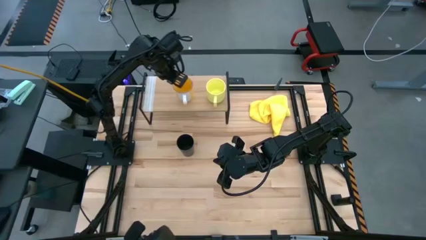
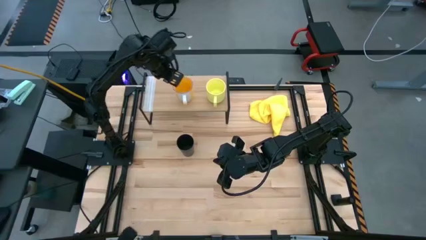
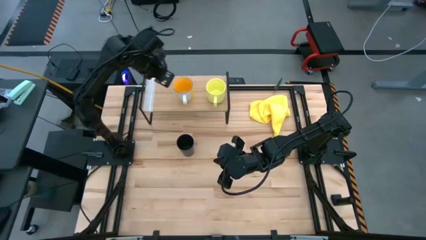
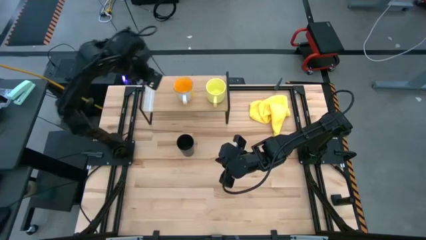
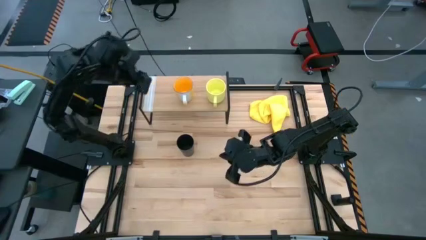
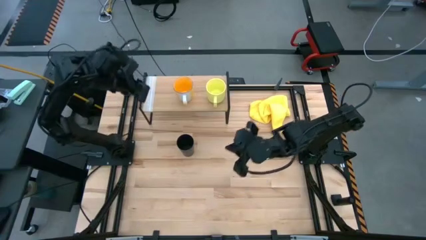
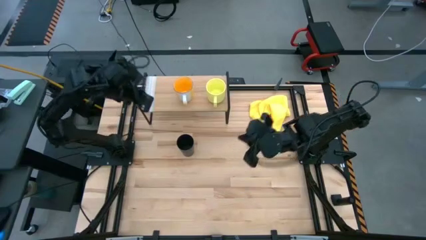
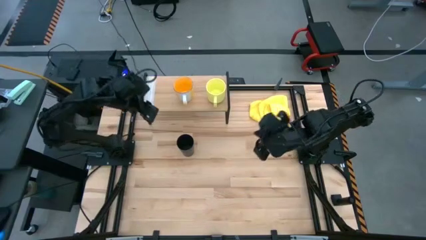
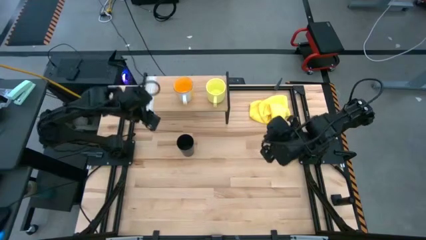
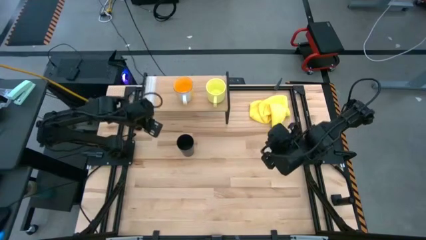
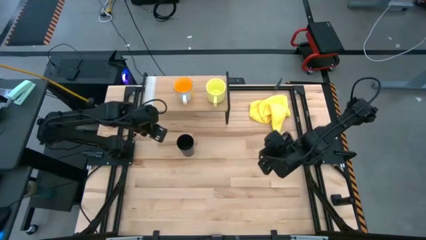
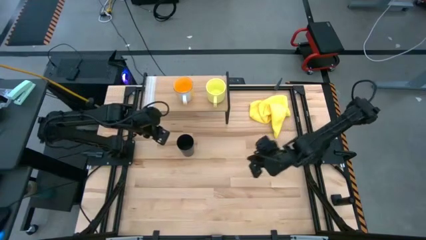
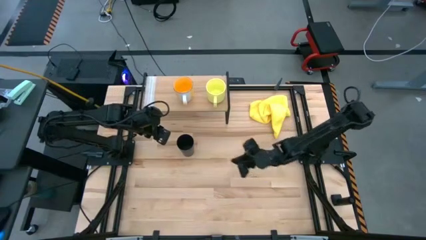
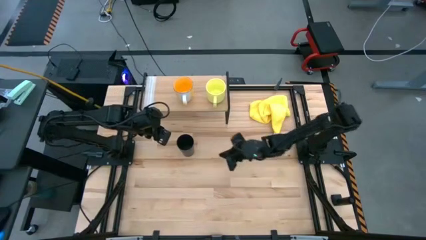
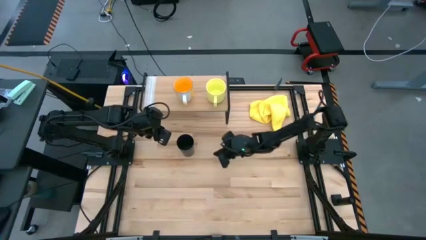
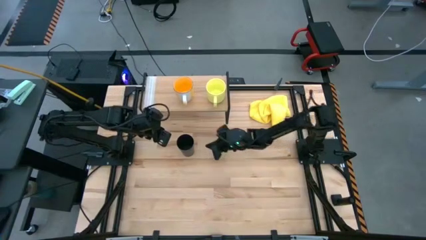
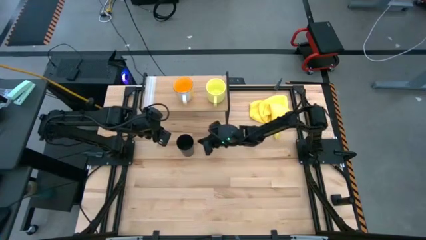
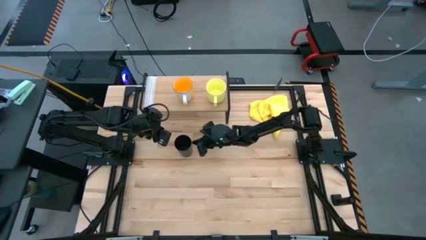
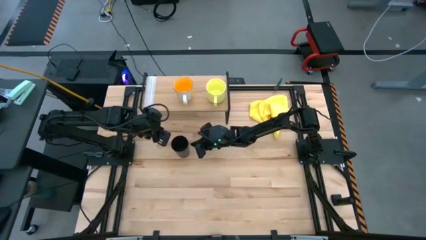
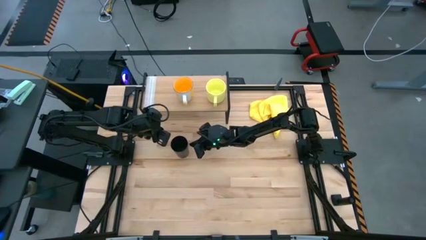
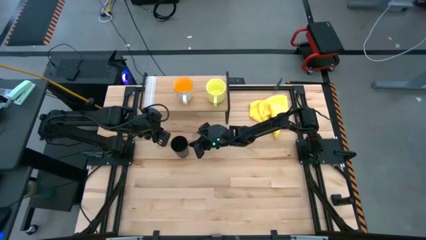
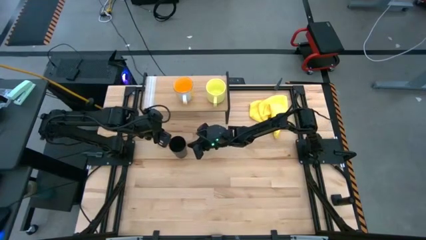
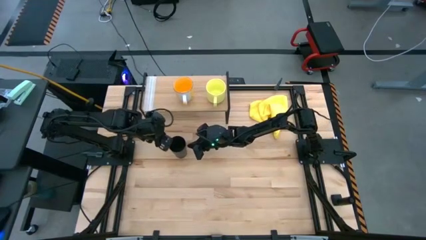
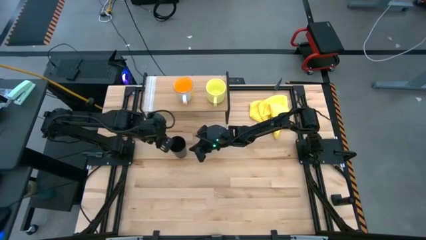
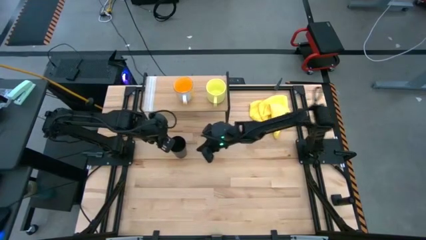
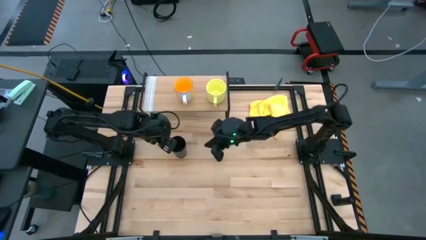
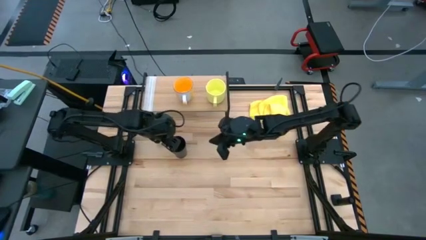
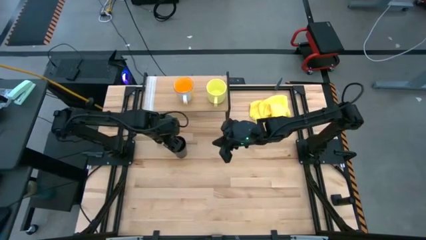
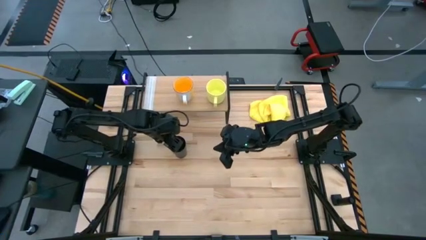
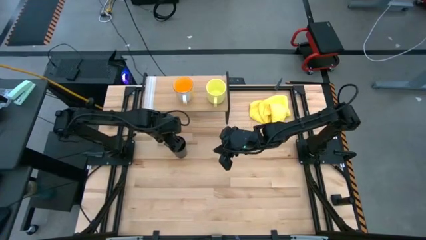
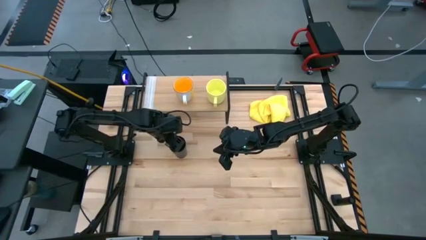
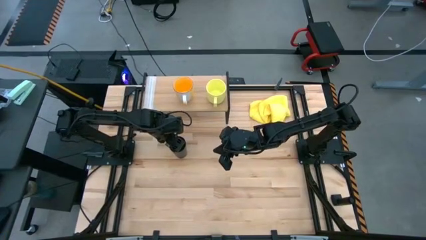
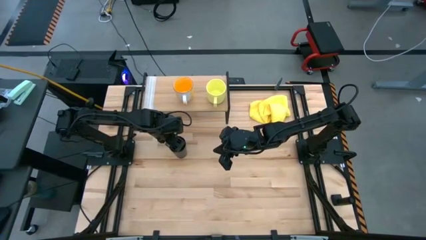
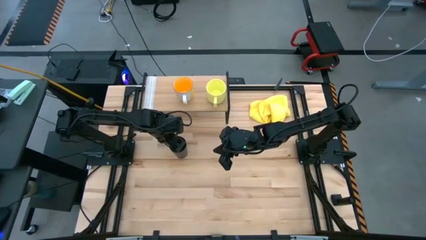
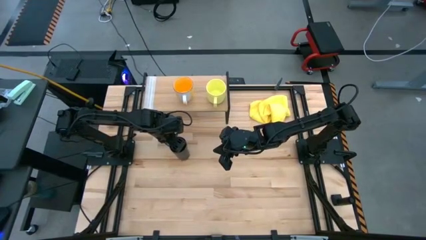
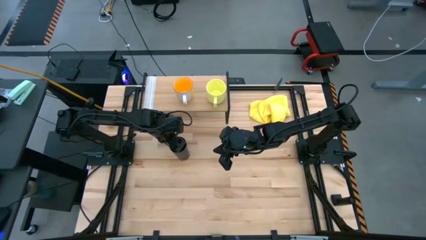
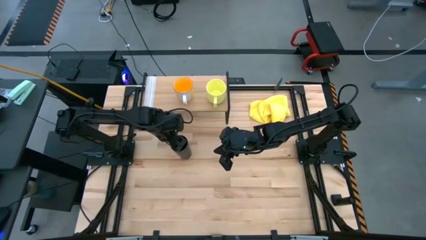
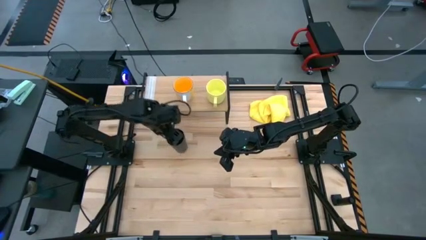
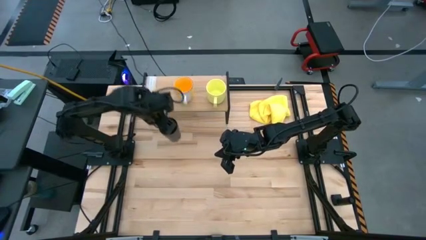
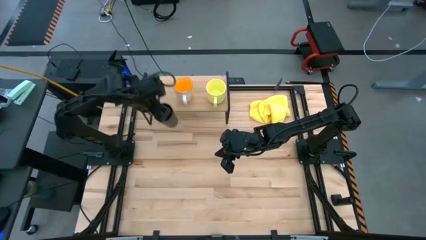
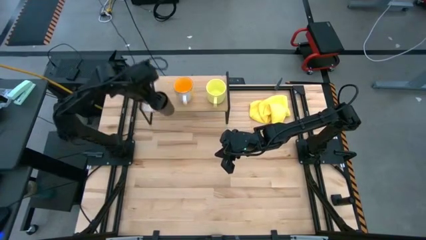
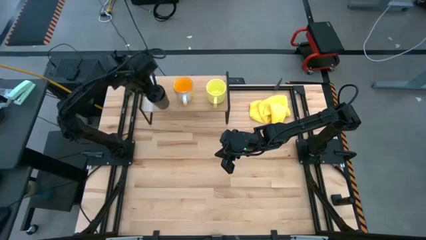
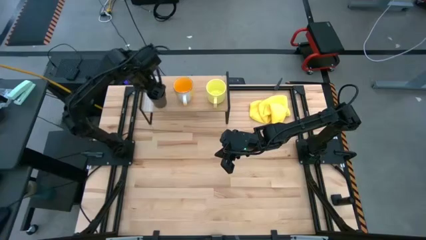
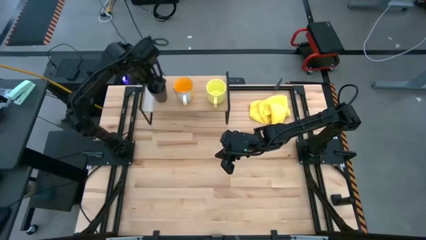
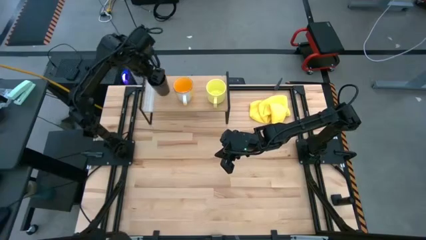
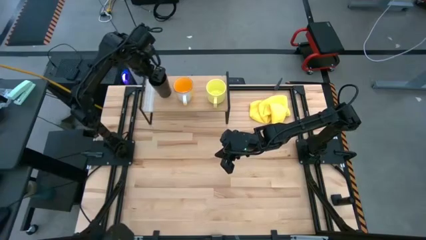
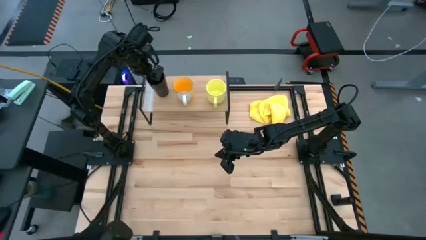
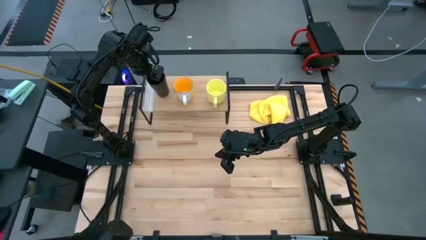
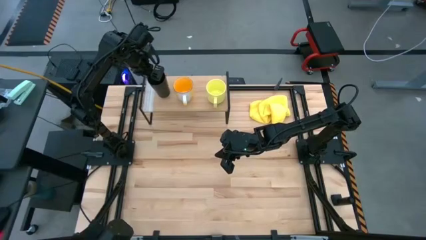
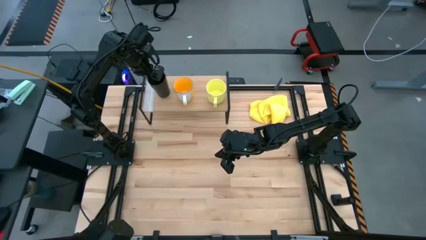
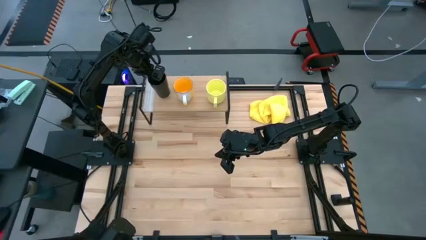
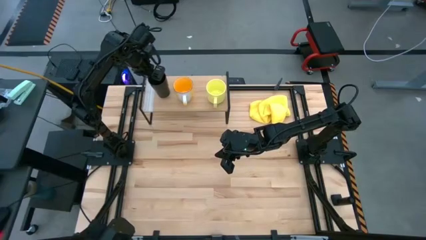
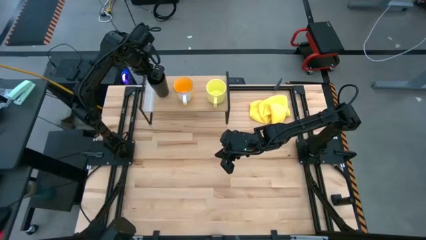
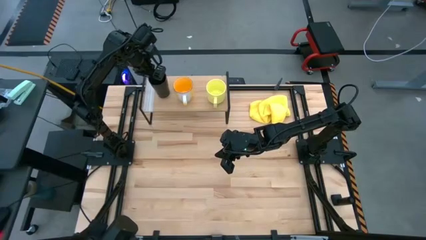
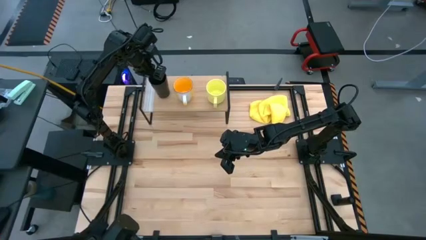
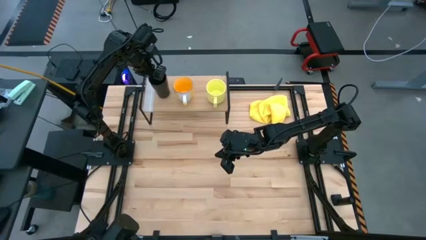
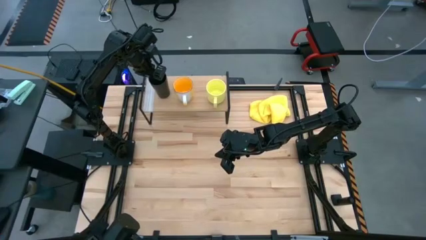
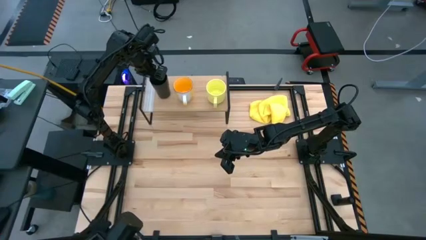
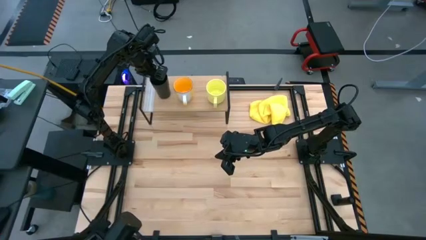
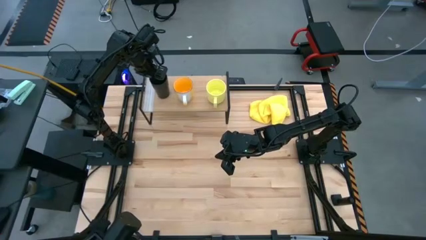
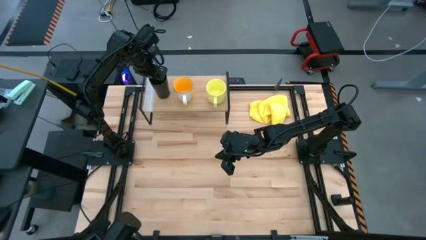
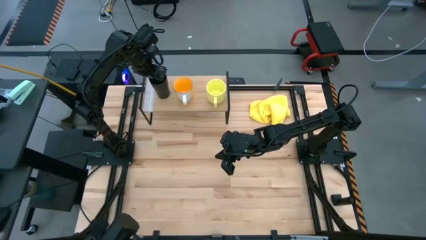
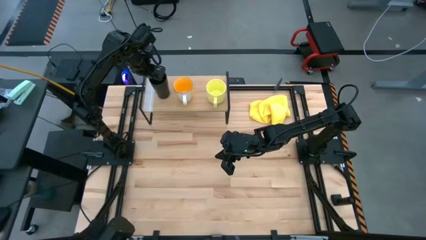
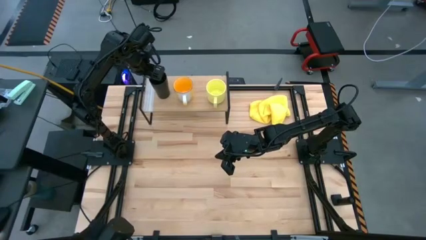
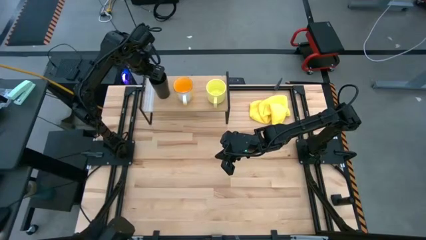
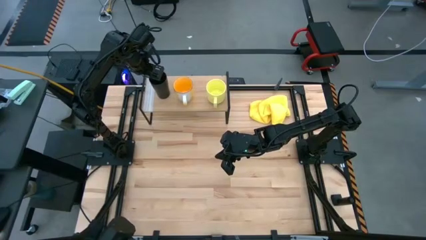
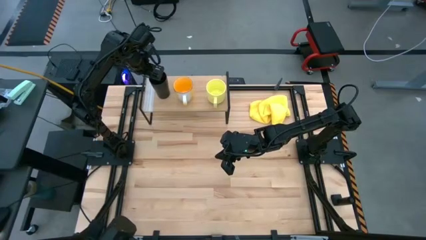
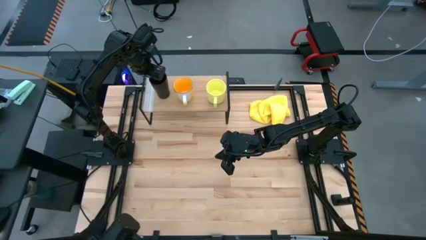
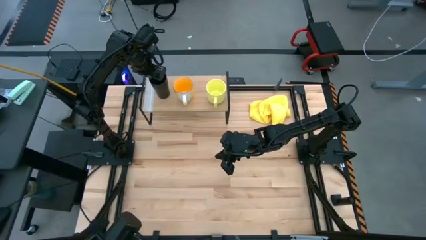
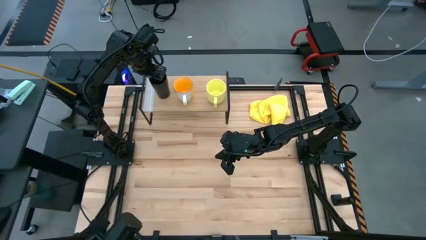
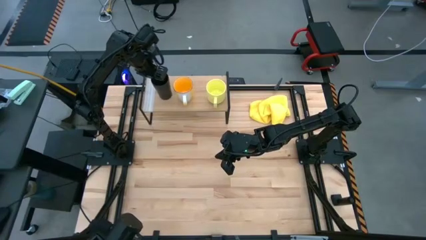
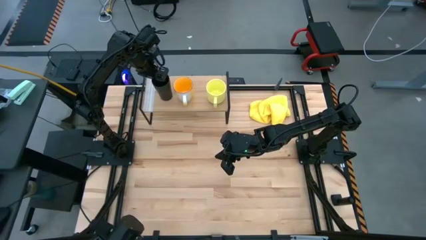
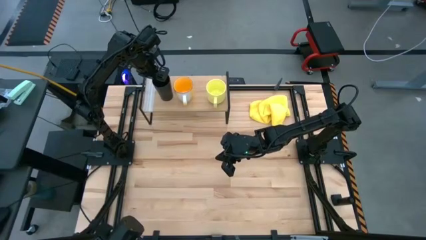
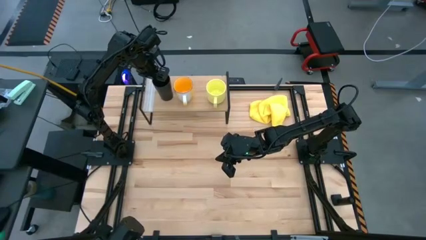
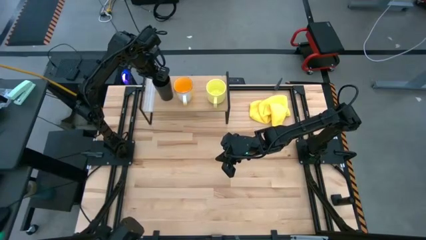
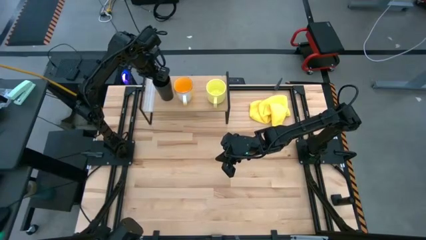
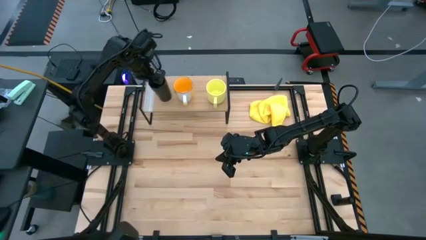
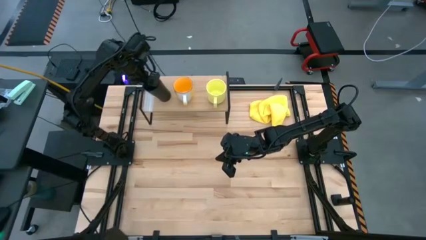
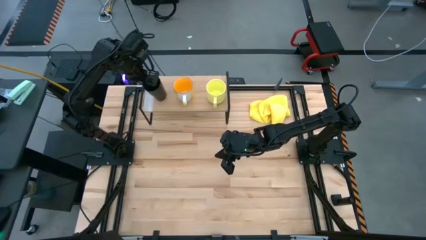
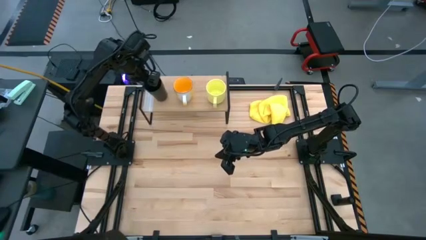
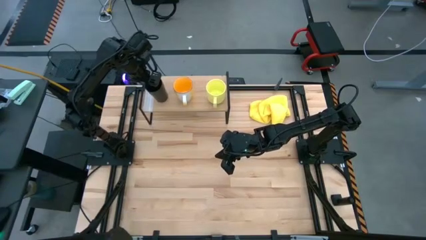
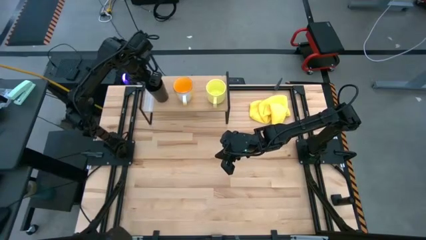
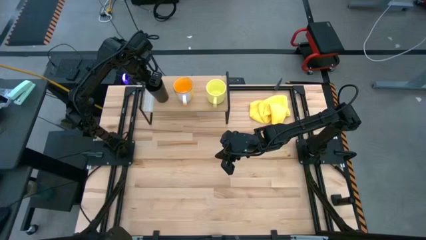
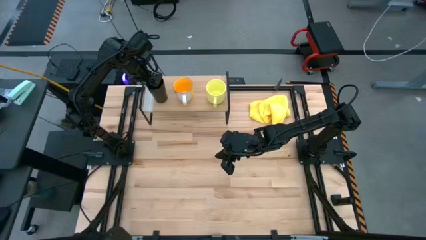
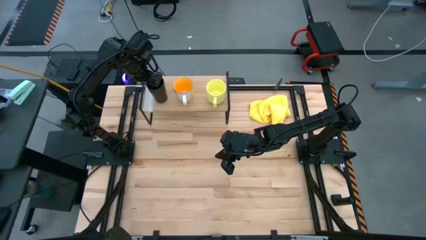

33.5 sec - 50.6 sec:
Task: Stack small to large cups/mugs on shelf
Put the black cup on the shelf
